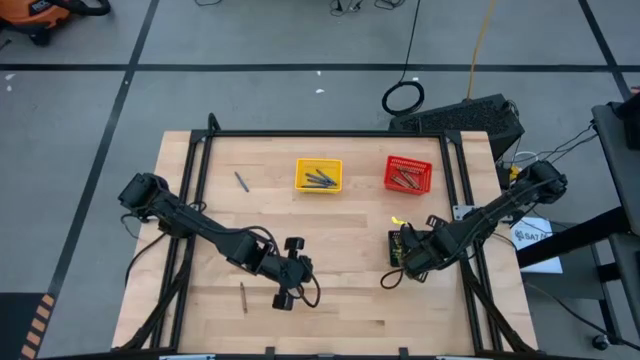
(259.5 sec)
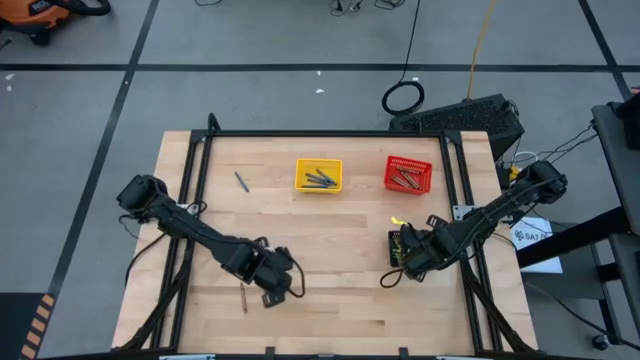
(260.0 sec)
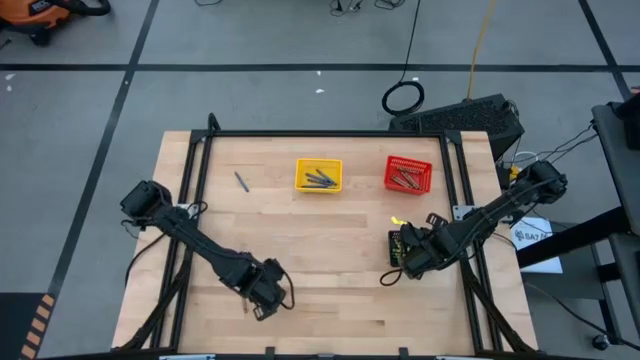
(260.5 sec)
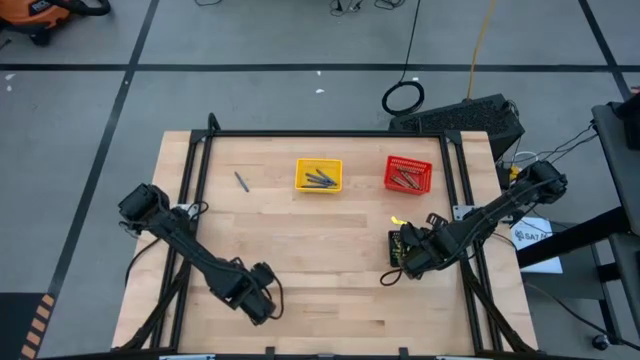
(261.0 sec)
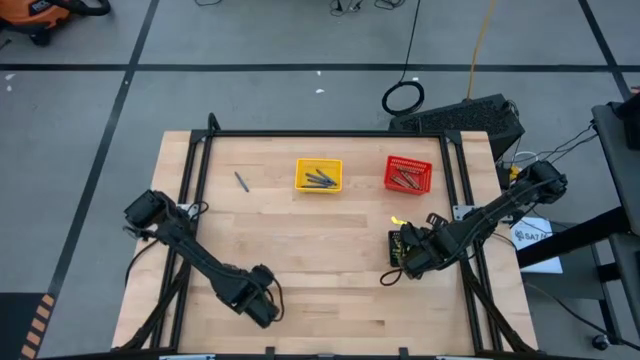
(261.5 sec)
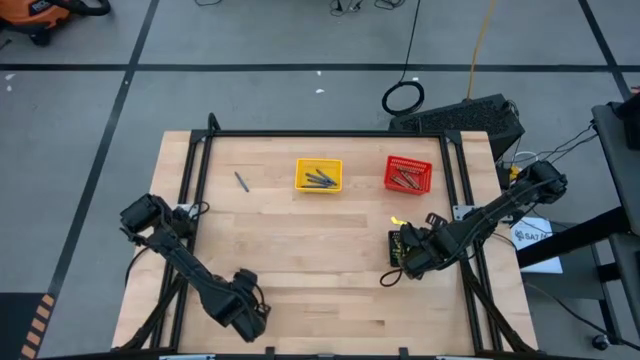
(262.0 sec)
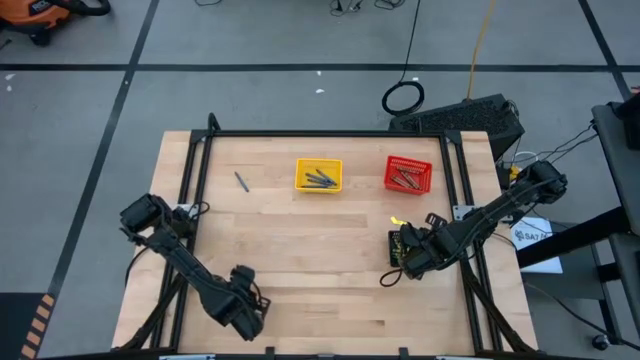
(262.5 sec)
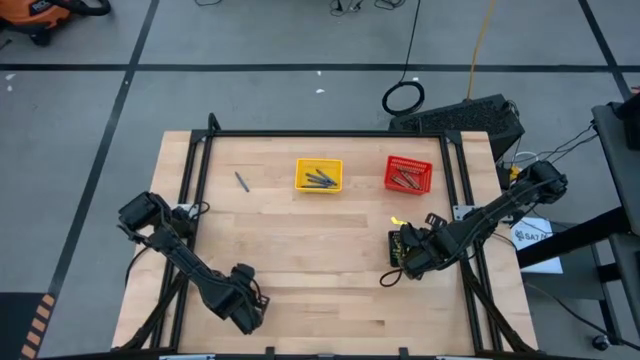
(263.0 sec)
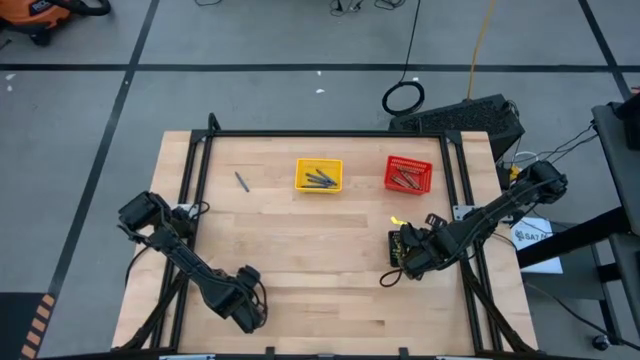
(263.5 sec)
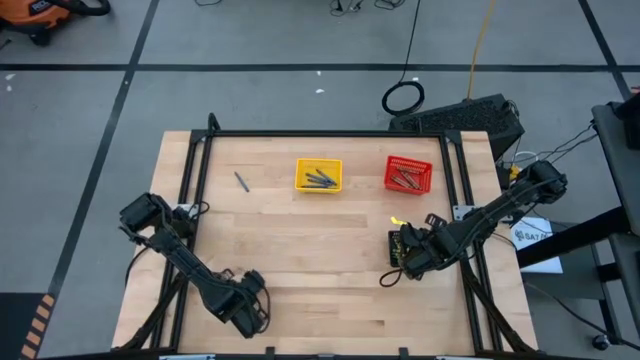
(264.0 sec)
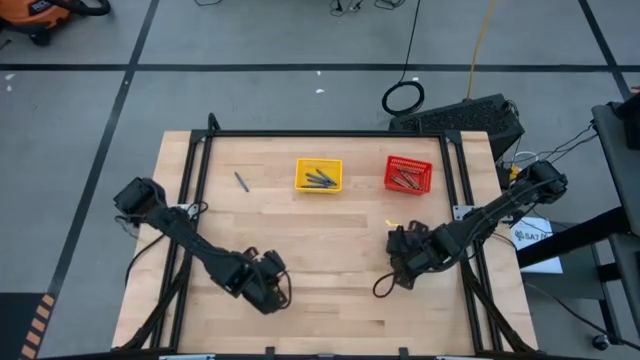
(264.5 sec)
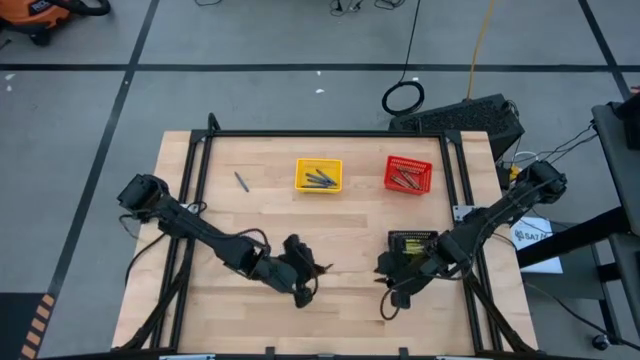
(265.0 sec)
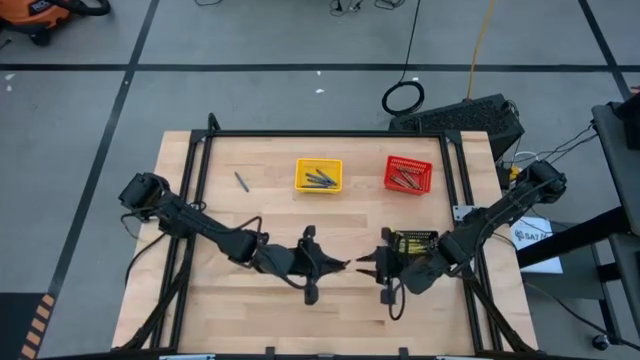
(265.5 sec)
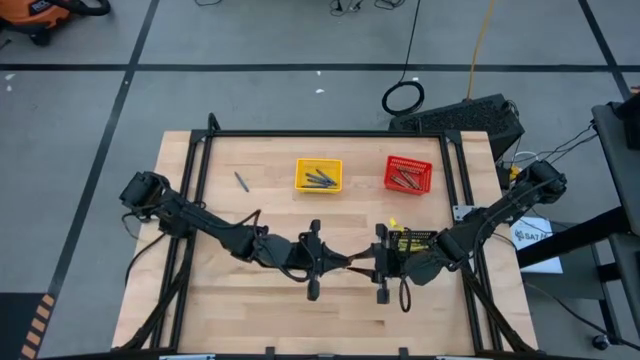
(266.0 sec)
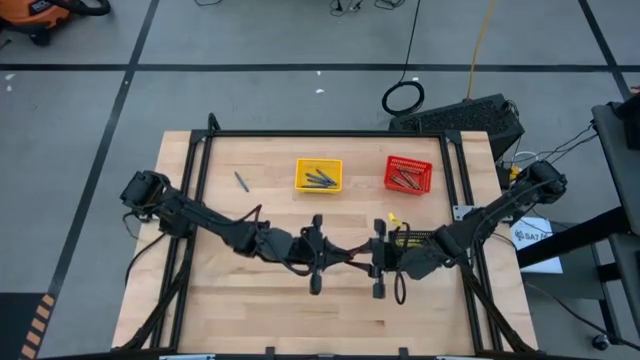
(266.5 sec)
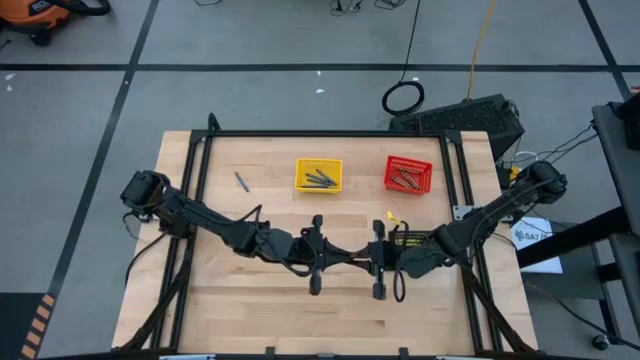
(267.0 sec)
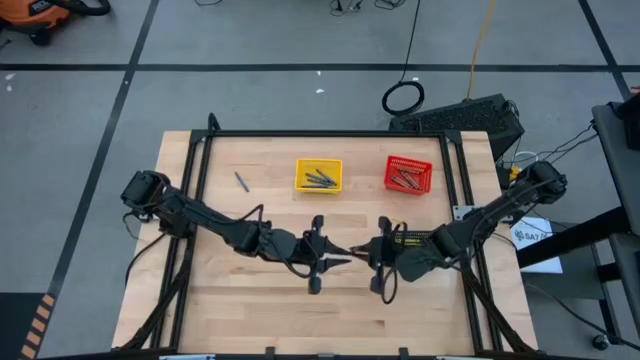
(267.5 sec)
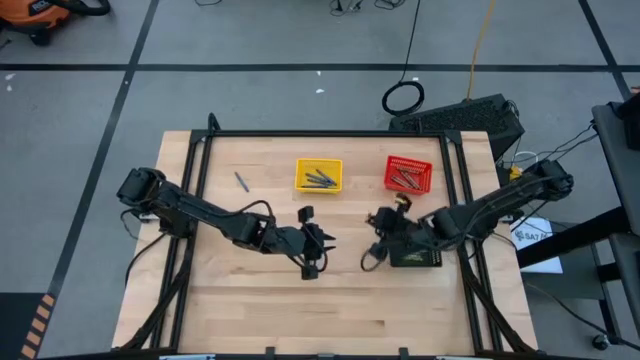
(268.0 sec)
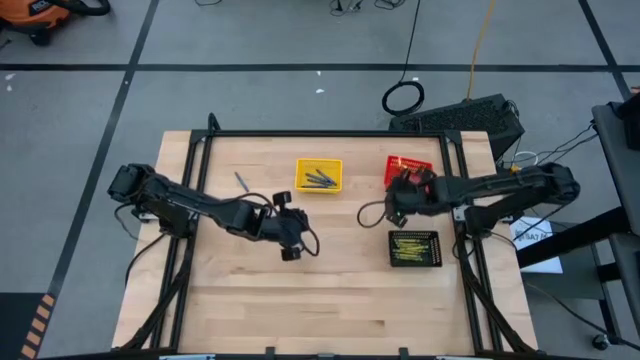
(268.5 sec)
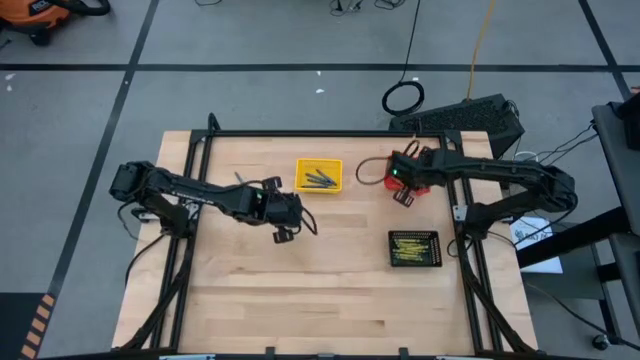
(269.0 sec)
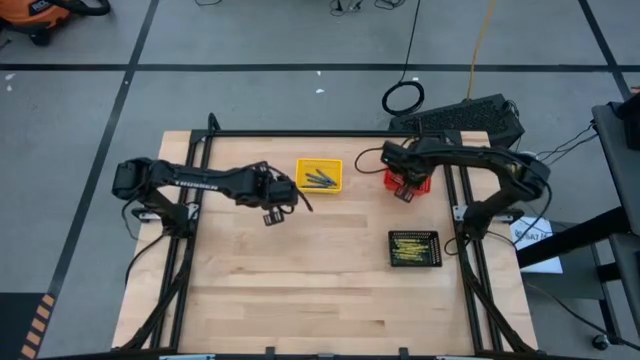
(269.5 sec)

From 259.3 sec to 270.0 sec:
Task: Sort crayons
Put the brown crayon into the red bin

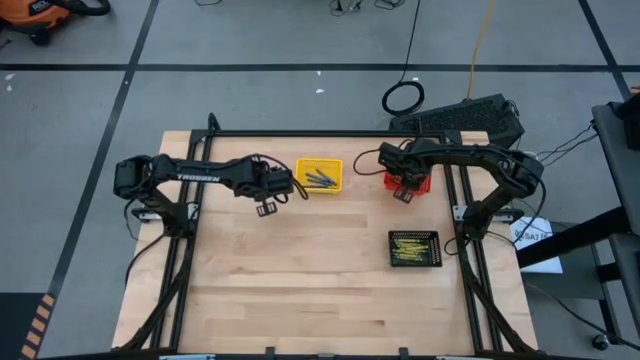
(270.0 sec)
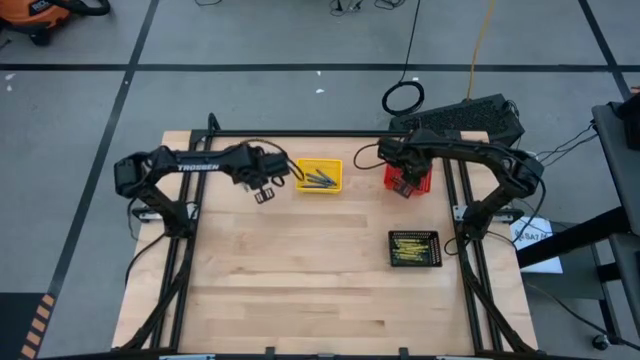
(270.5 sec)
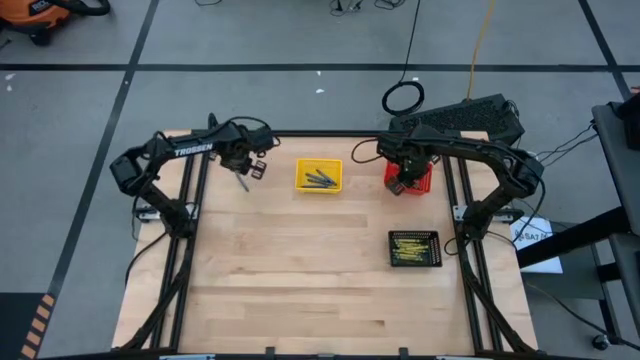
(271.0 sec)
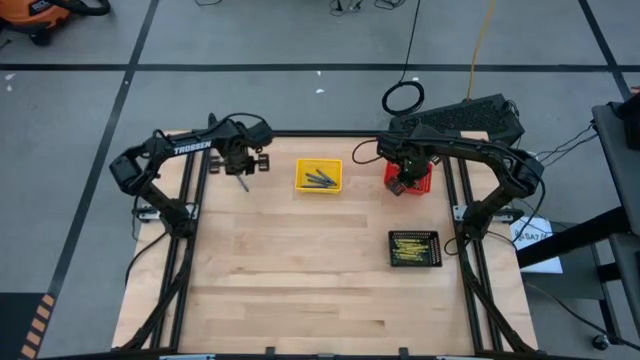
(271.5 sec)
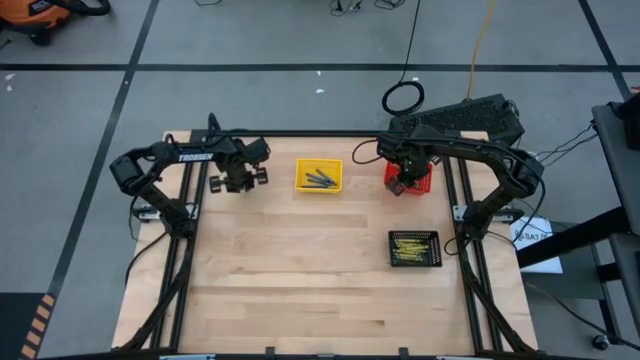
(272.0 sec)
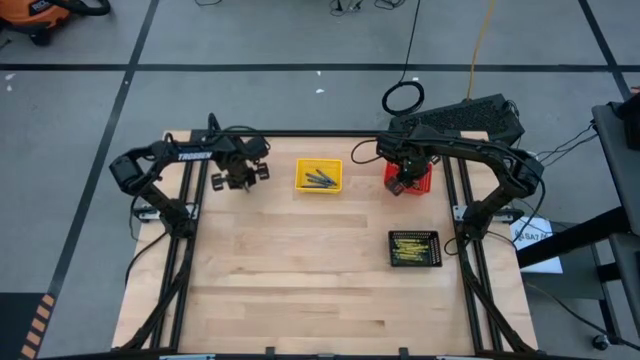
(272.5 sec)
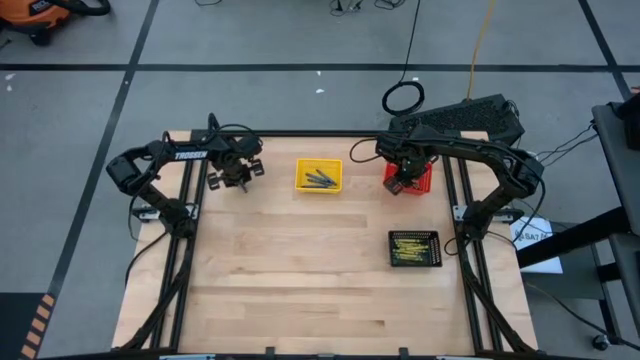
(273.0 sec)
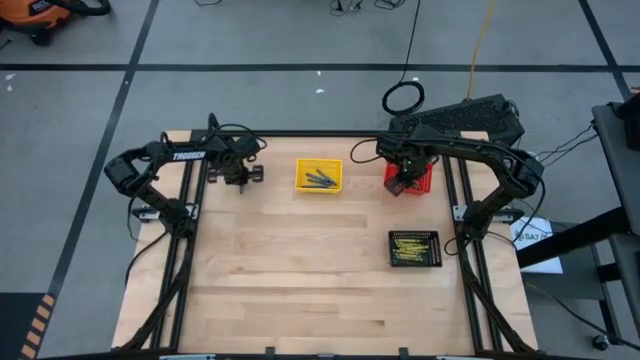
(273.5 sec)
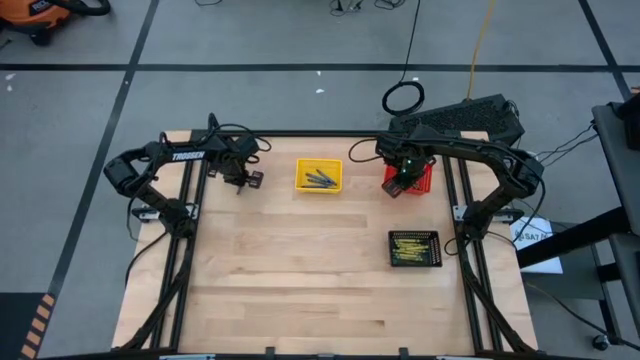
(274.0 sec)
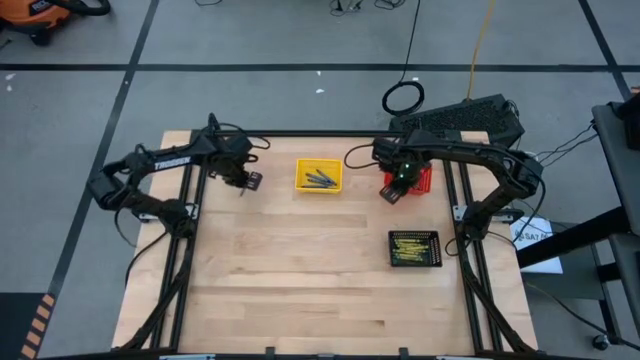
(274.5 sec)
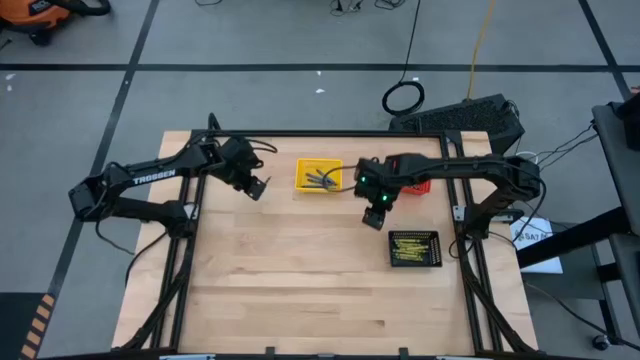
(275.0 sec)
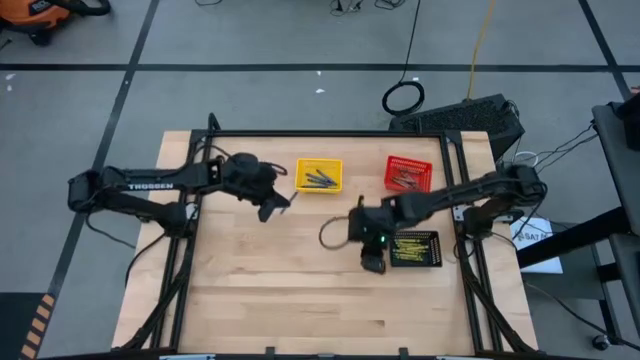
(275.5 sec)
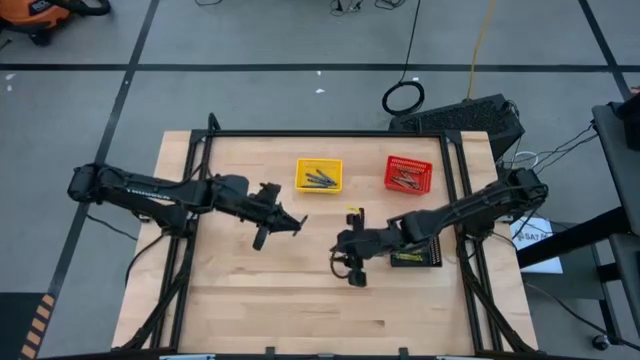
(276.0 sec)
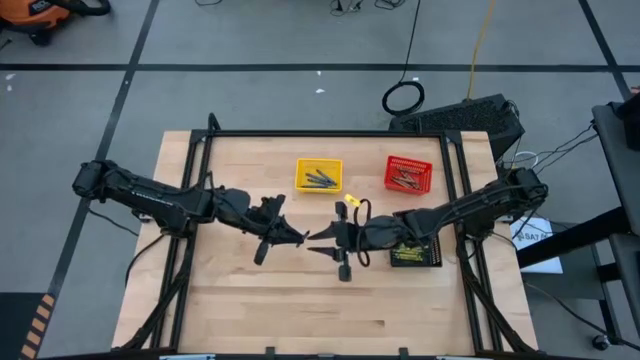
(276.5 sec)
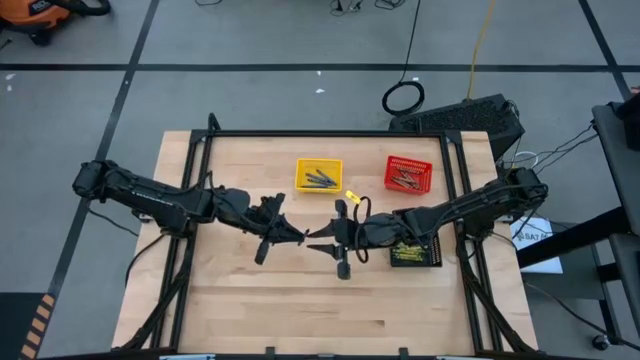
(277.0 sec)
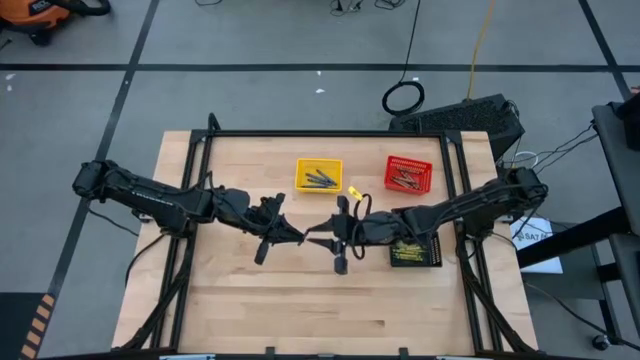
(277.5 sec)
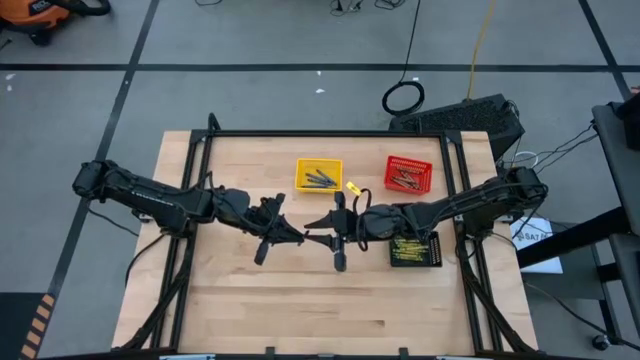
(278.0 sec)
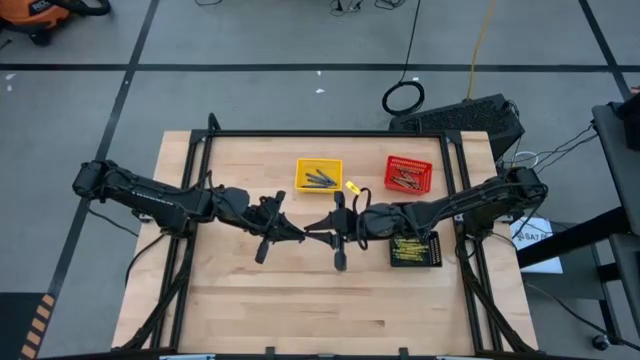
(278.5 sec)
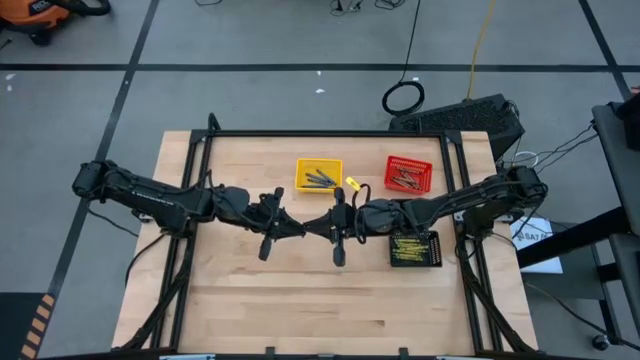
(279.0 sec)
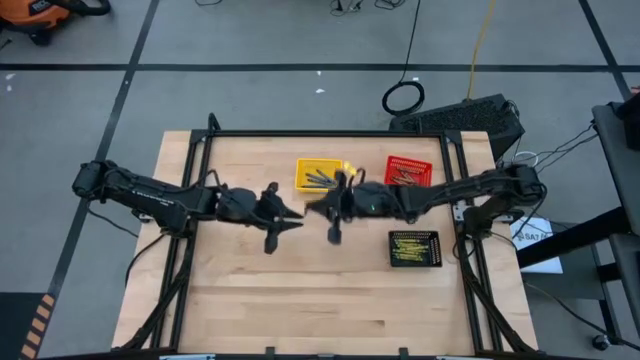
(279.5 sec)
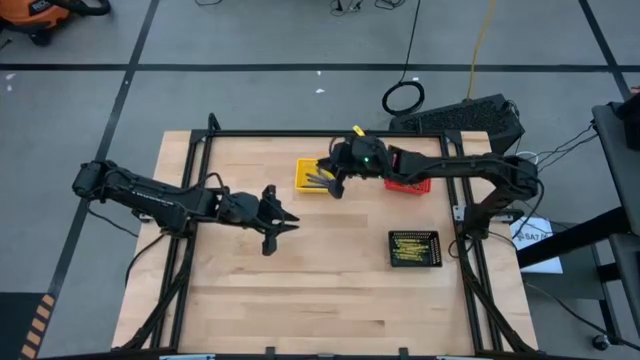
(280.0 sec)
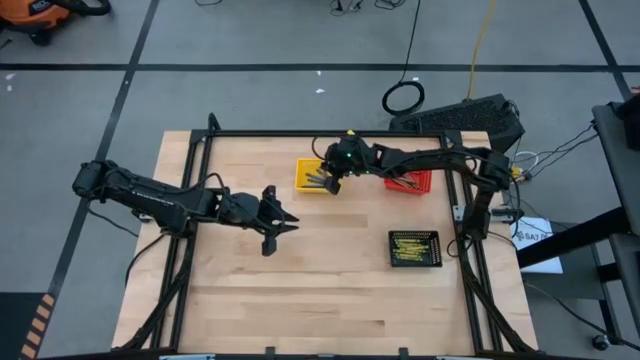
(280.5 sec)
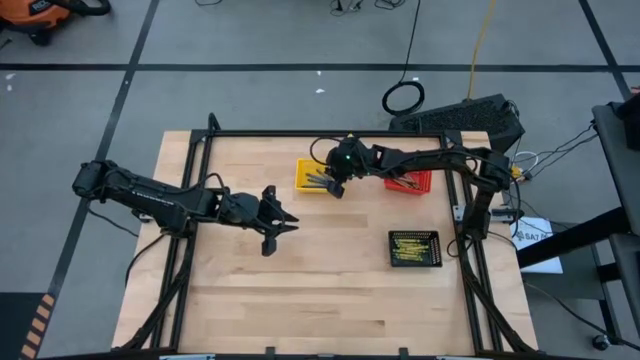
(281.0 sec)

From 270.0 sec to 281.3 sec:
Put the blue crayon into the yellow bin
